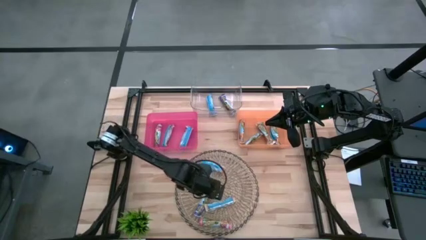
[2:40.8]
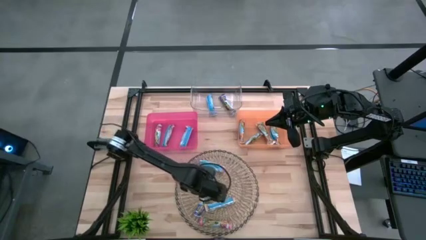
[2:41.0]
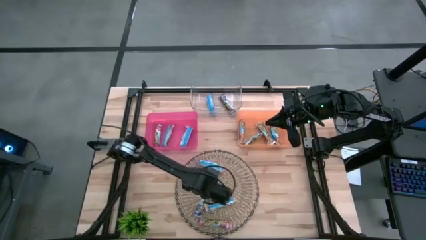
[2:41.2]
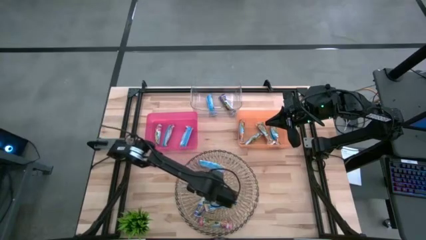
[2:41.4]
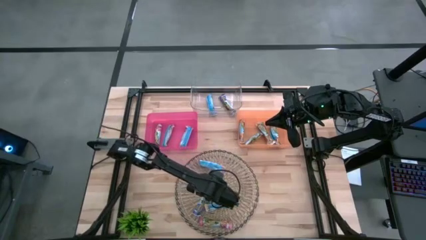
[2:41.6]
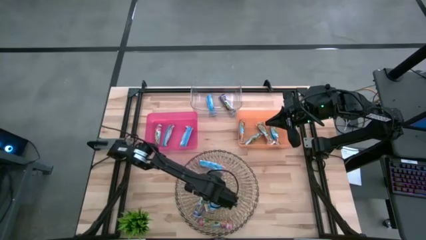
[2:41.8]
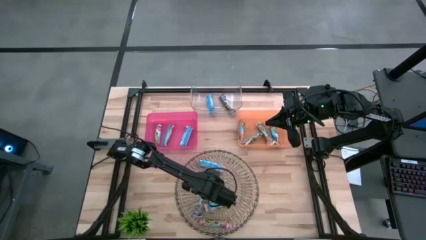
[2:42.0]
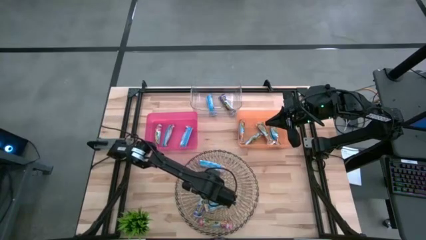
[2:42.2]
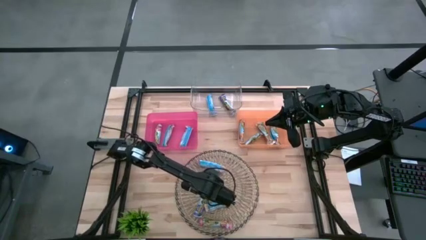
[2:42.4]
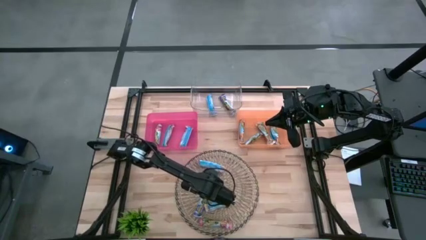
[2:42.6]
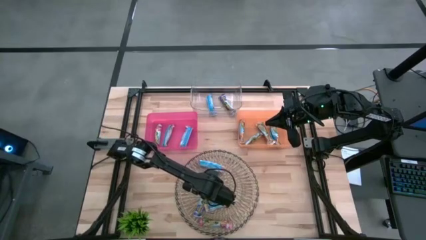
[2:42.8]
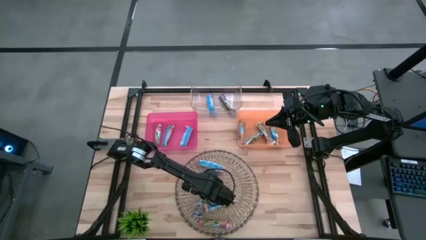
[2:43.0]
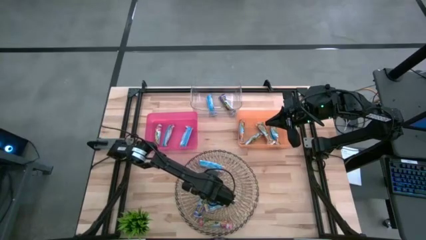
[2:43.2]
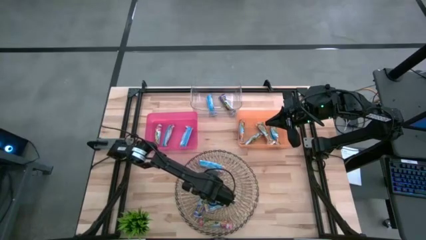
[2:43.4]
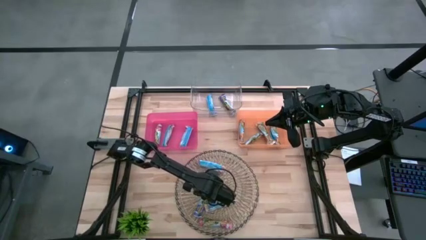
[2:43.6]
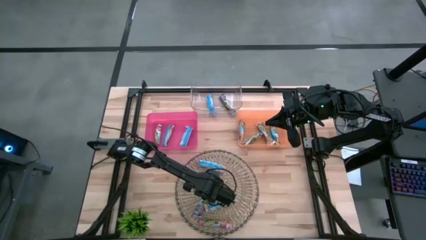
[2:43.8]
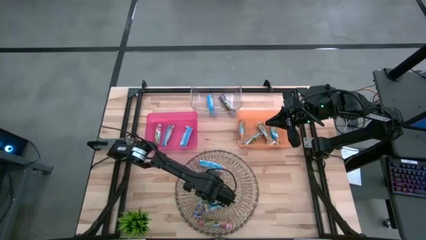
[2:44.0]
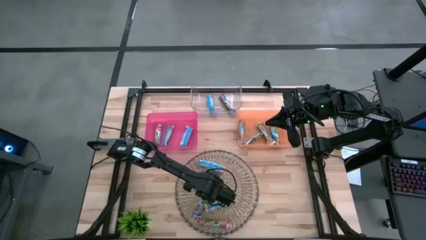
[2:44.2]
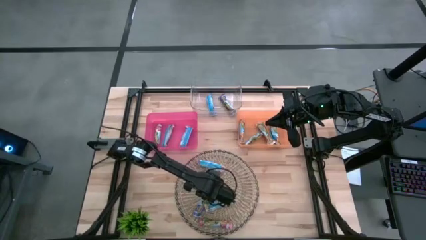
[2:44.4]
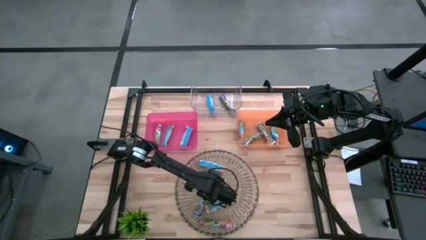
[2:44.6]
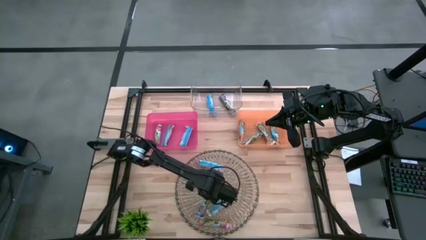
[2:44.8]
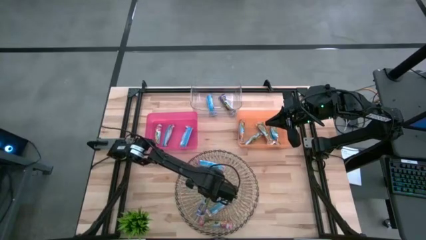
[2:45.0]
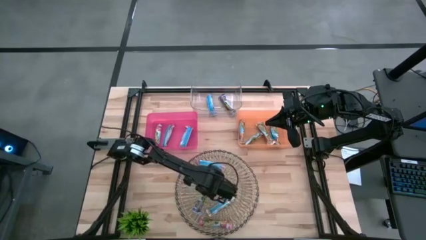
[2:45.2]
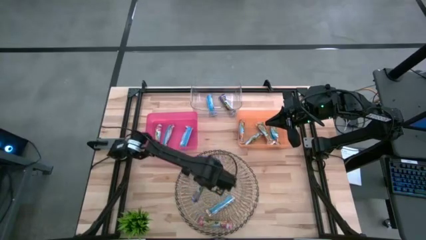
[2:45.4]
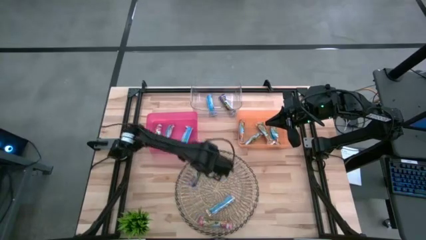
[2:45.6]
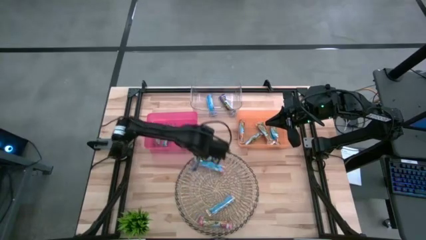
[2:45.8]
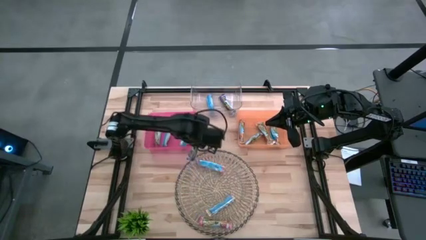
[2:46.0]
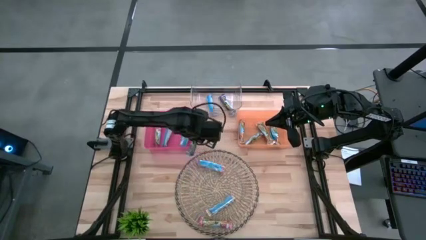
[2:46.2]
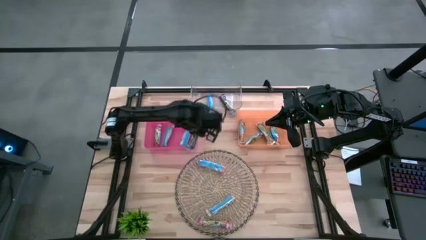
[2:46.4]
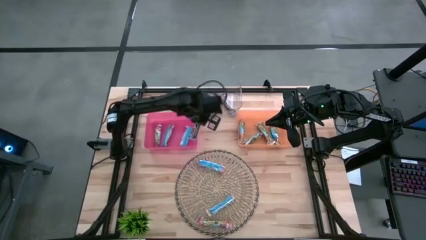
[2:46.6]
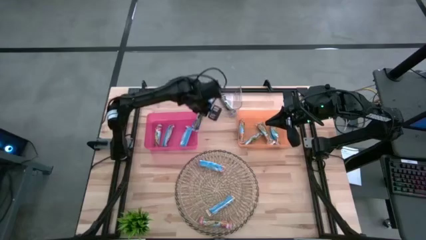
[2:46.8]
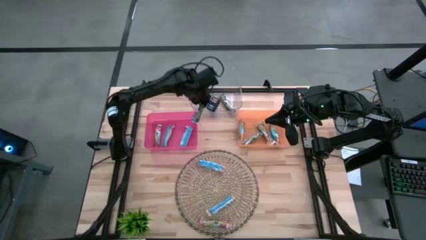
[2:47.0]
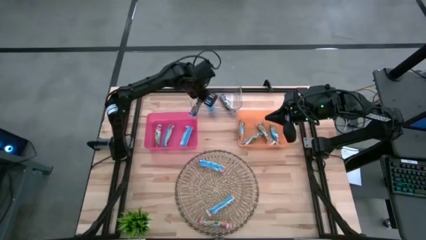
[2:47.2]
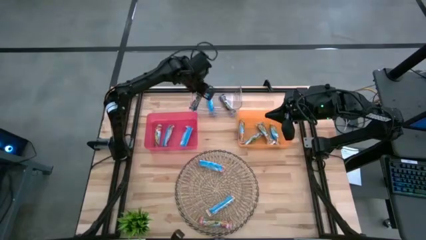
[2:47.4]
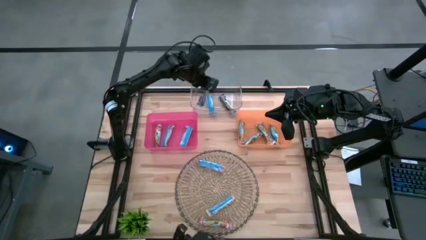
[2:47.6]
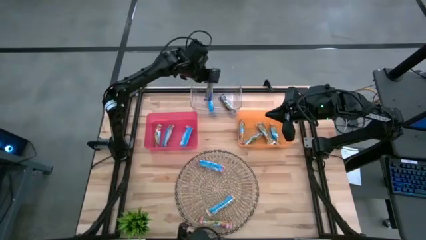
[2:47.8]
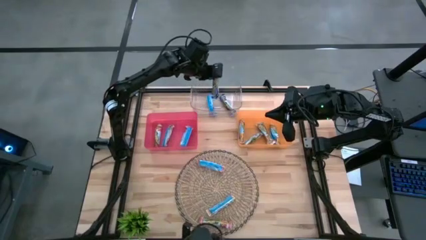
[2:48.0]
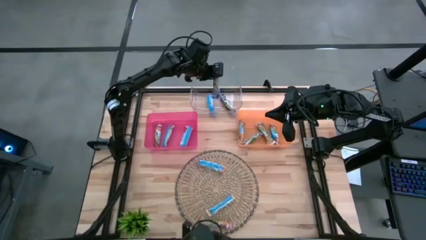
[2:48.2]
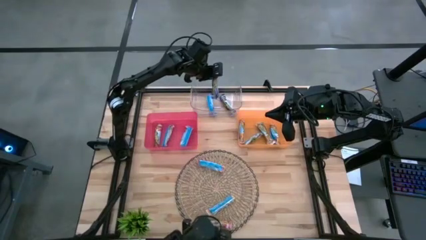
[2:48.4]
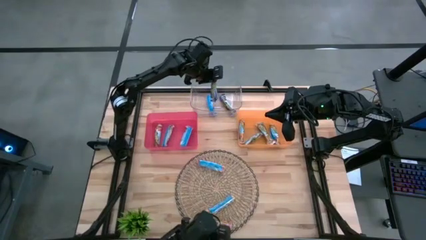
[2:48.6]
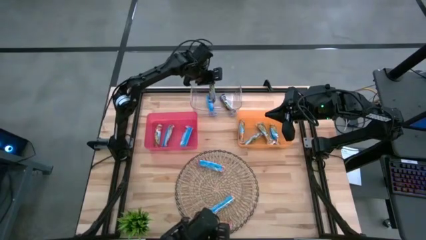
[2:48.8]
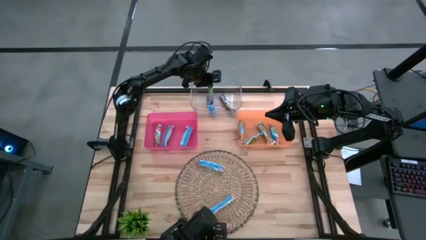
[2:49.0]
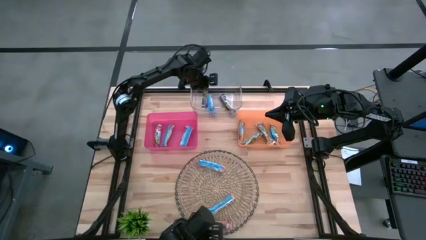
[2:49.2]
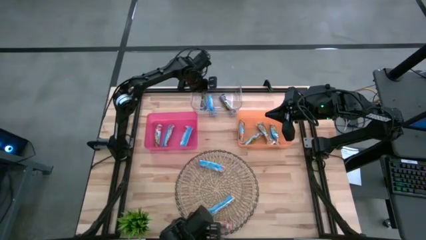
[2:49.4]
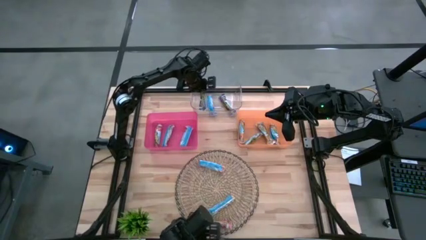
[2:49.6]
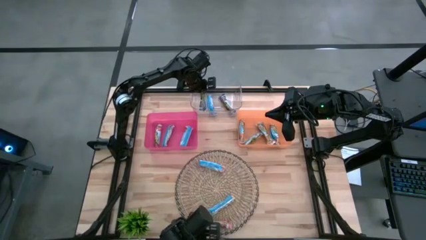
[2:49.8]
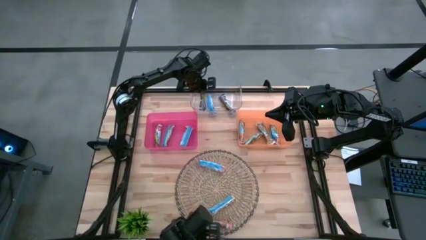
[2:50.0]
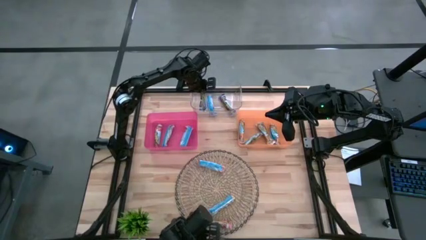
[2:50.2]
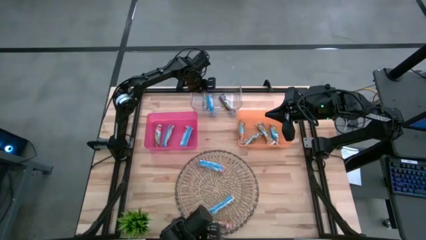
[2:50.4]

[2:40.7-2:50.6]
Task: Pick and place Granola Bars by type
Put the blue granola bar into the transparent bin

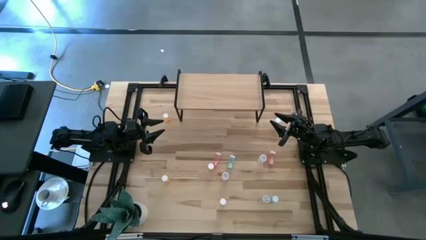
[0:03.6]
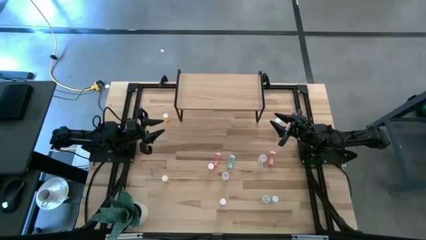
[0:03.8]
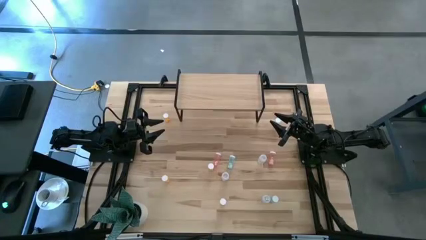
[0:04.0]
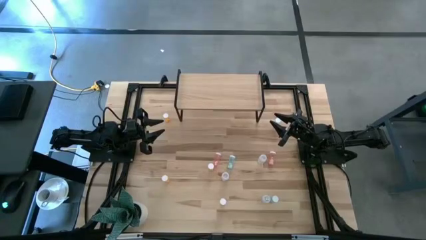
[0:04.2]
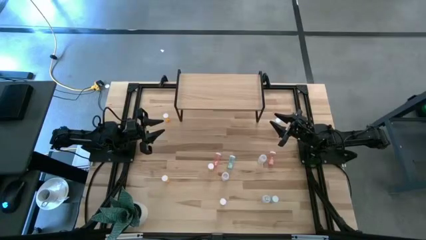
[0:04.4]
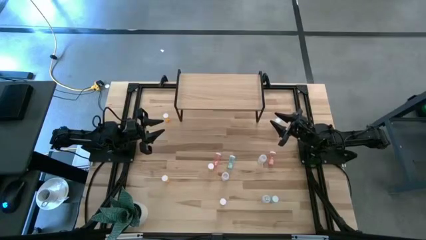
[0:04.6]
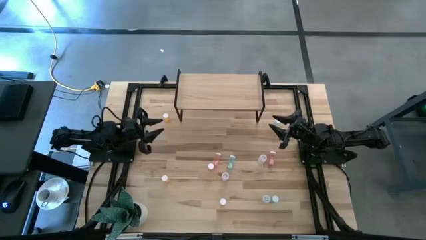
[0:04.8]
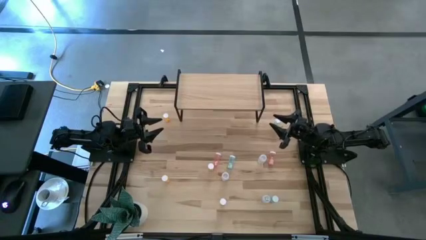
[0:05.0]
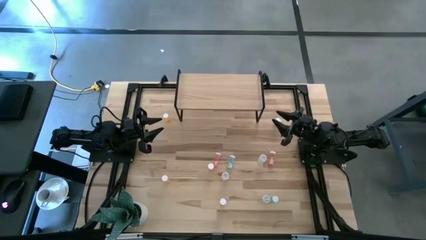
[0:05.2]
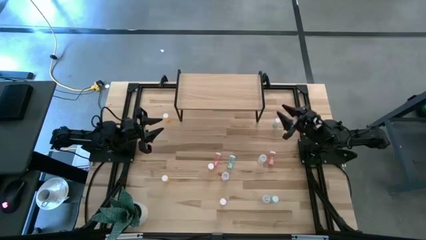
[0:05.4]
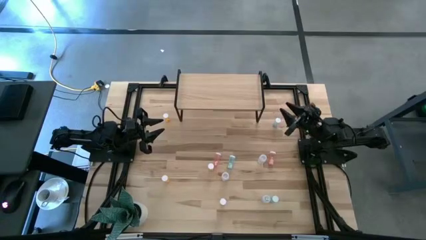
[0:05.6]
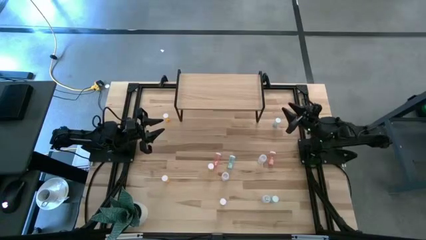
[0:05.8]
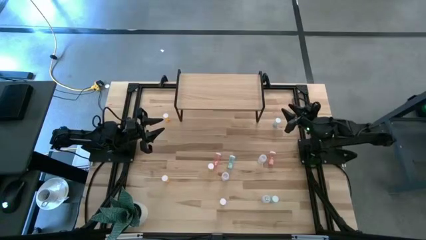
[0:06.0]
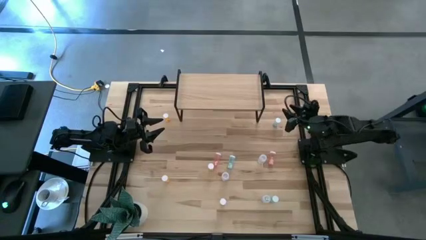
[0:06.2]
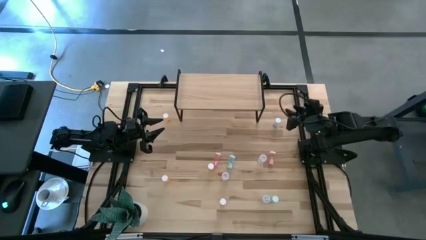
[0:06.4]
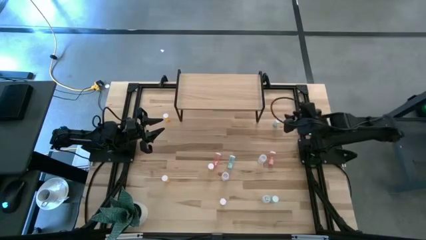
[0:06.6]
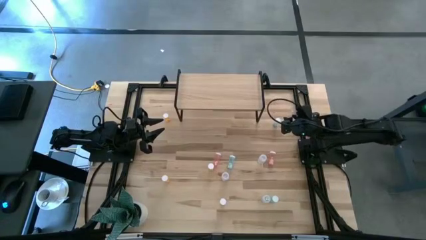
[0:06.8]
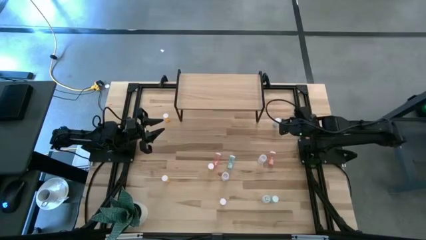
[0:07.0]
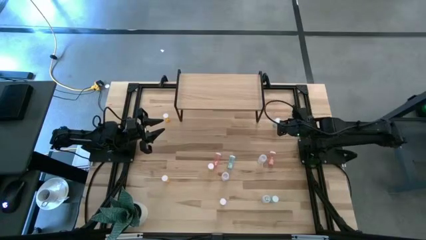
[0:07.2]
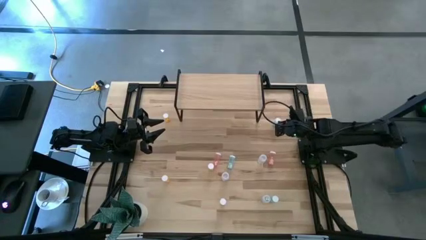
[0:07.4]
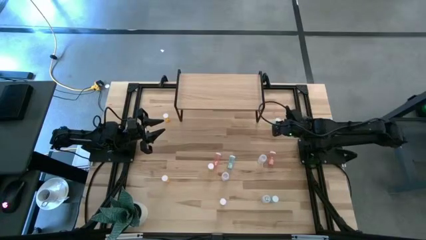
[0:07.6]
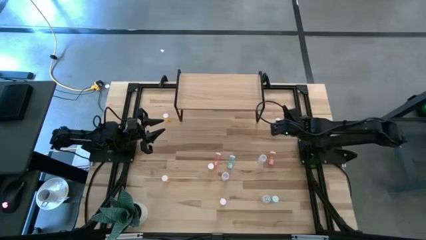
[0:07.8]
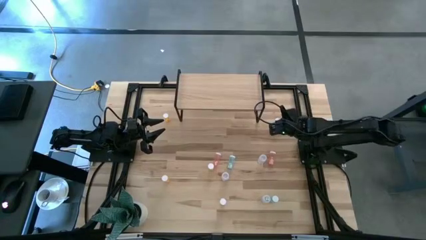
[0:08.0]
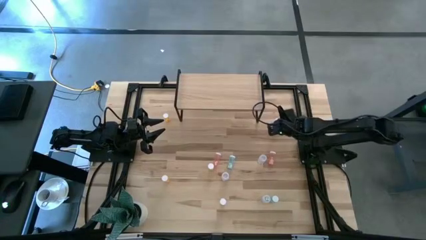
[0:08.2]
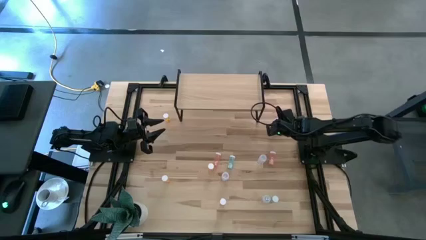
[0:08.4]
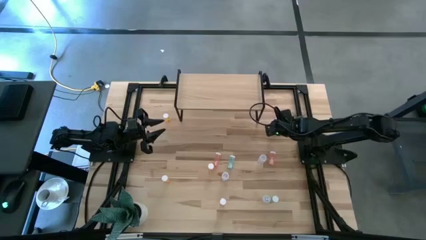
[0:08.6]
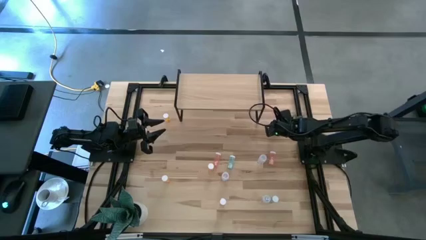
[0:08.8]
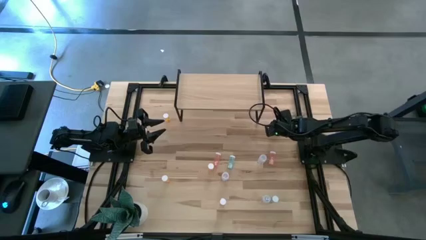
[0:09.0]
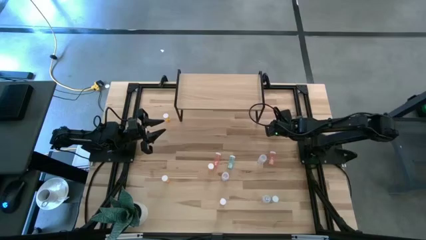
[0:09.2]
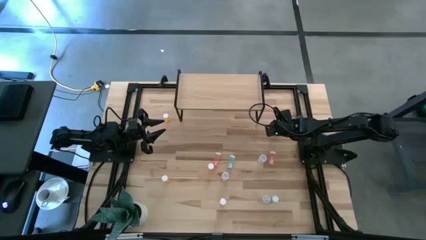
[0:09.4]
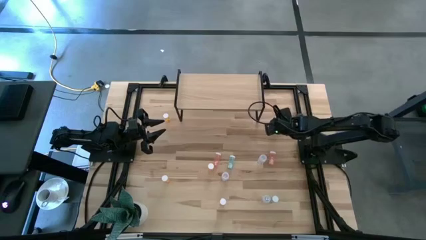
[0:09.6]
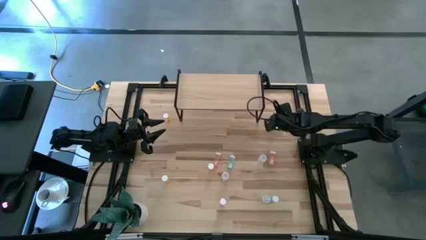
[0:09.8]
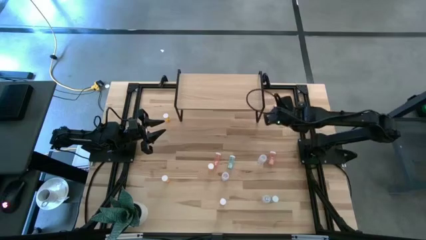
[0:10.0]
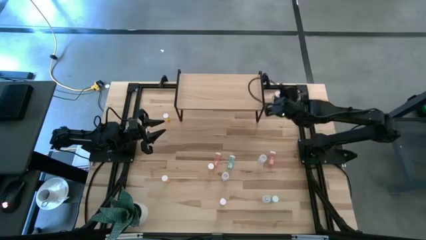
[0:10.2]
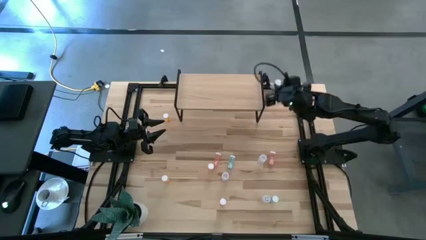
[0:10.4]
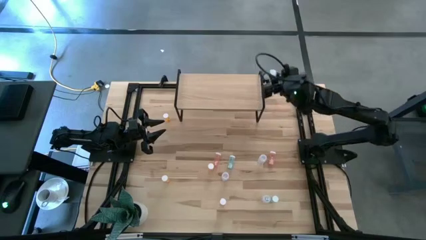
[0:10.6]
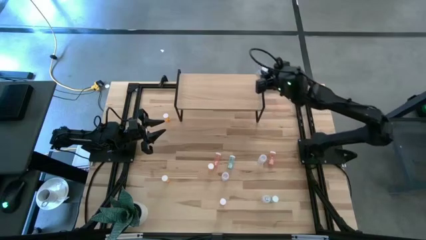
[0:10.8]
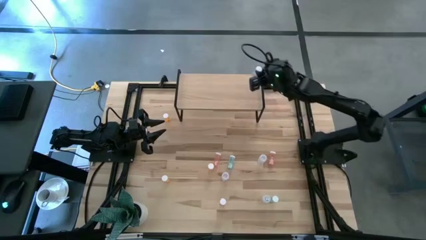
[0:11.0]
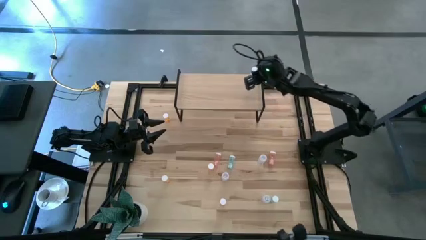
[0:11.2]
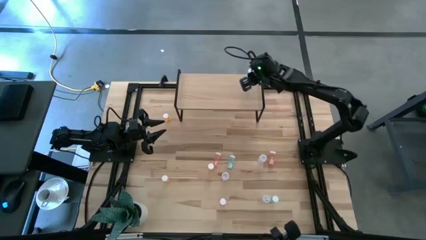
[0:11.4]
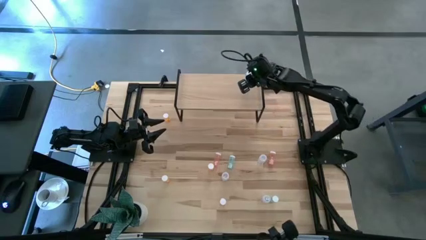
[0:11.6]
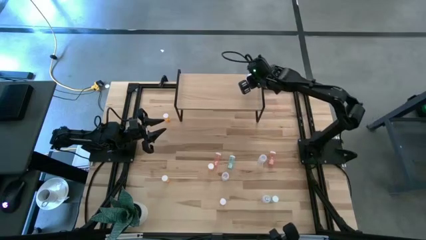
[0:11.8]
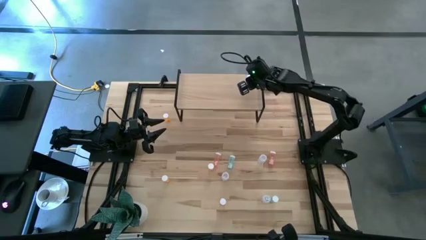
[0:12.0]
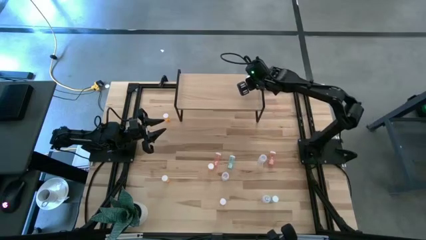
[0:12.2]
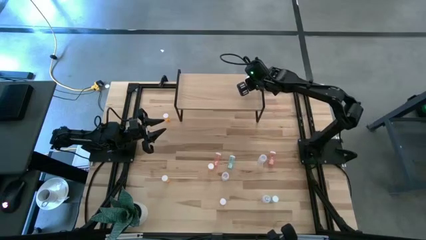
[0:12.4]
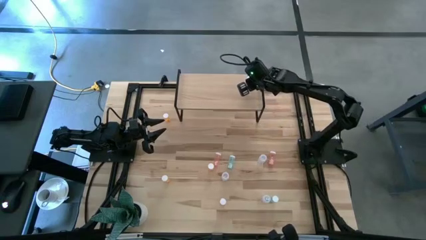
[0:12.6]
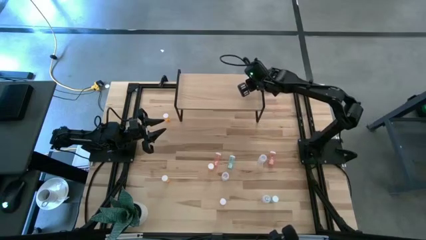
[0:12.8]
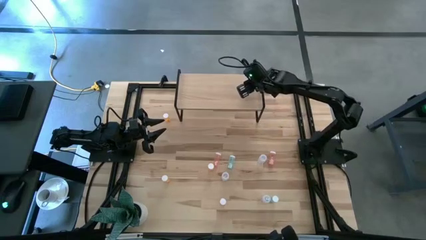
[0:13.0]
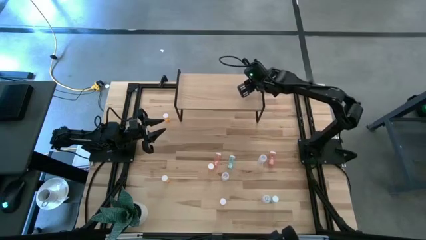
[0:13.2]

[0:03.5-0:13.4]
Task: Pick and place medicine bottles onto shelf by color
Put the top blue pill bottle on the shelf
